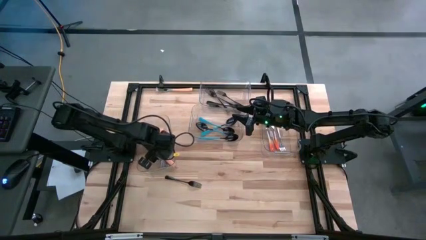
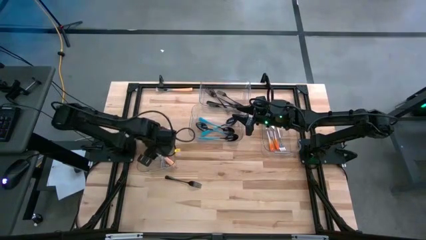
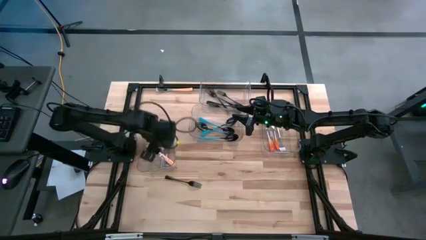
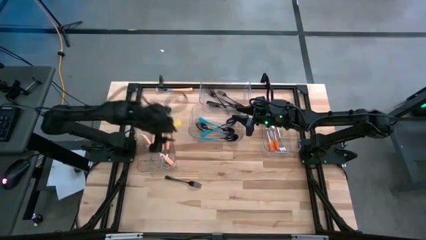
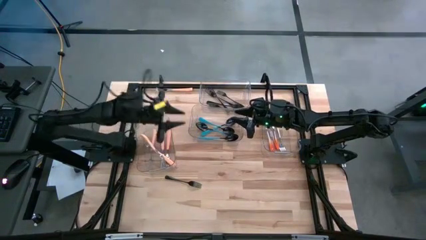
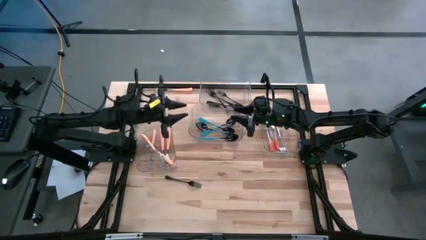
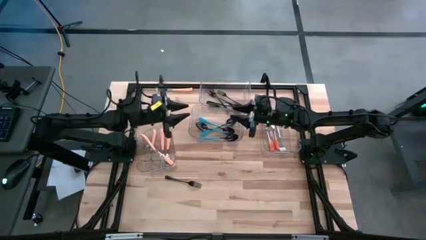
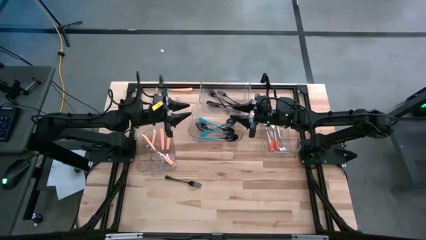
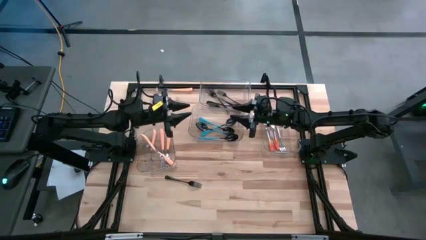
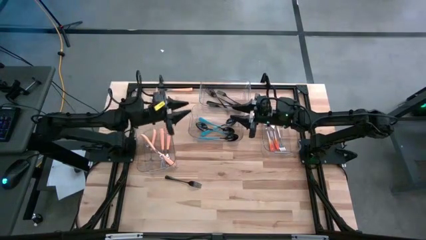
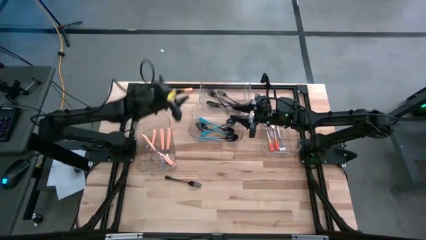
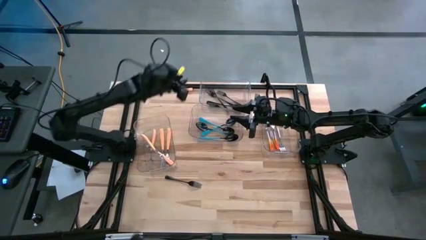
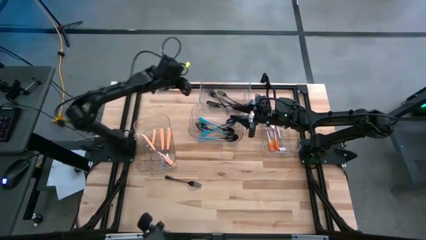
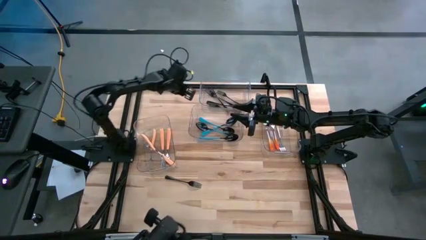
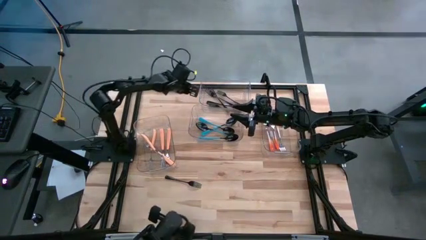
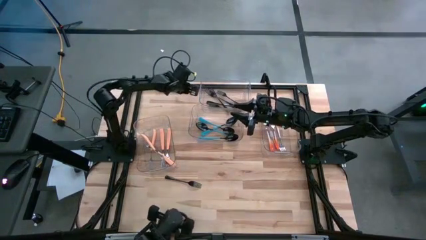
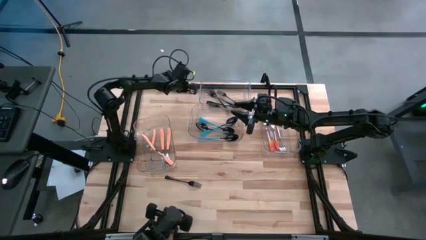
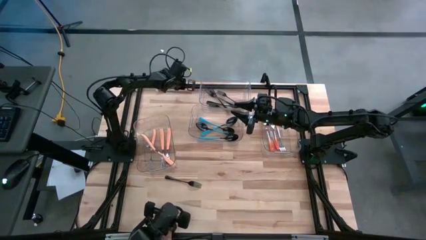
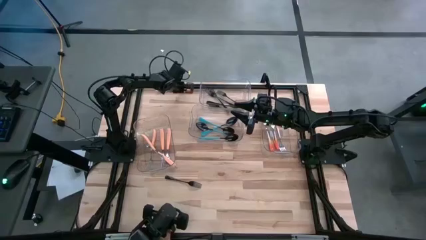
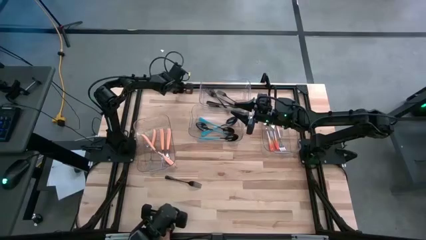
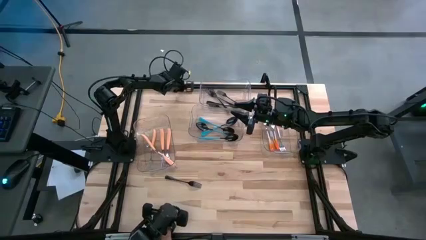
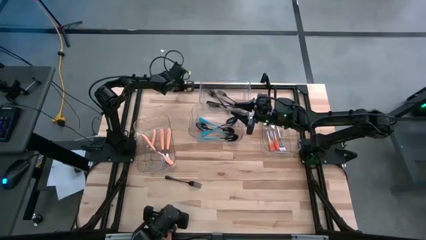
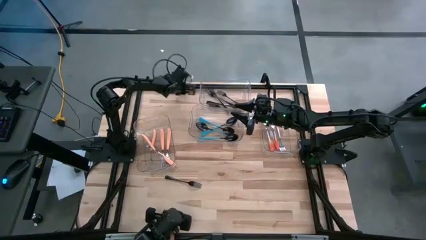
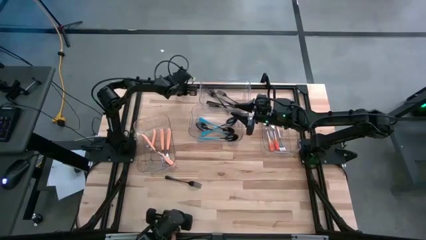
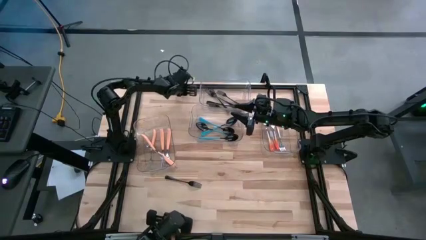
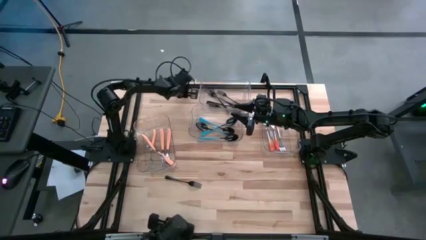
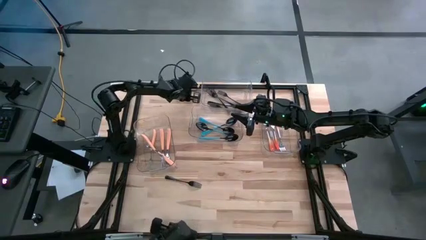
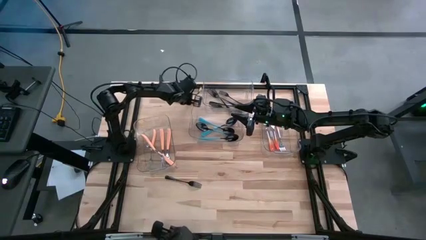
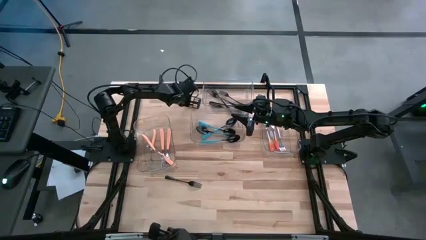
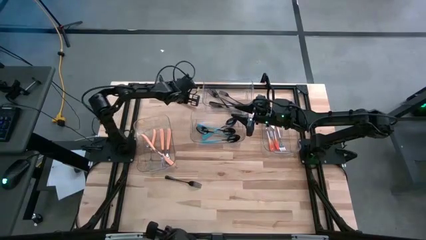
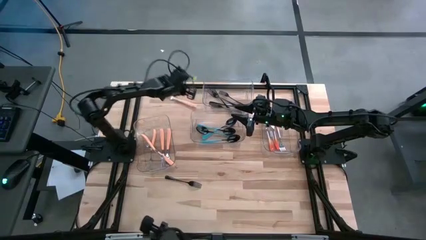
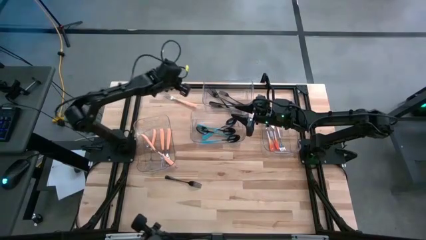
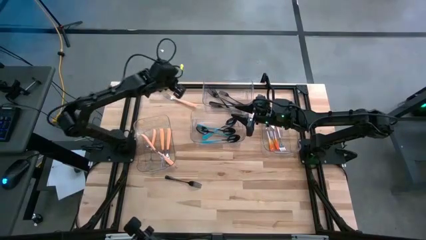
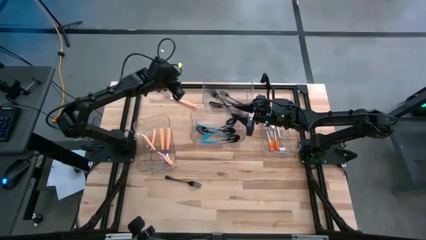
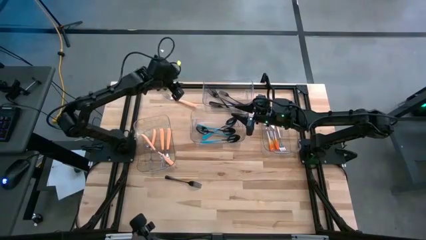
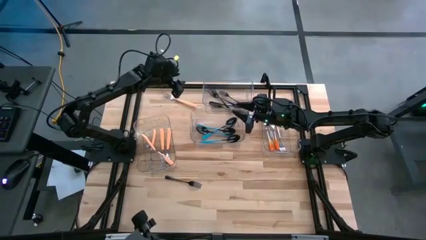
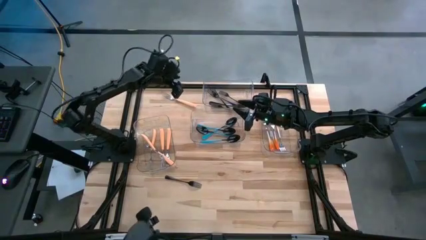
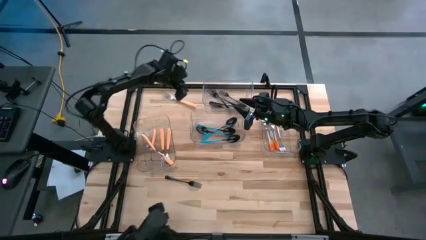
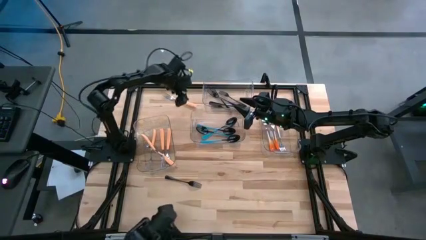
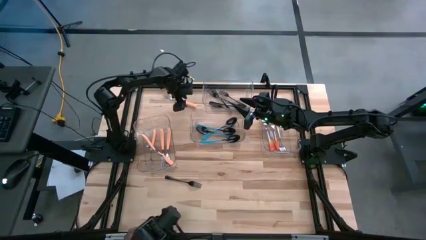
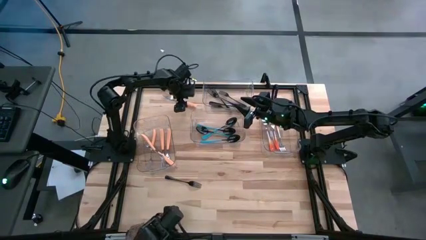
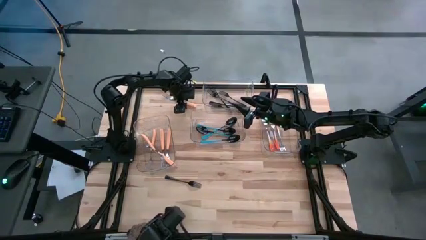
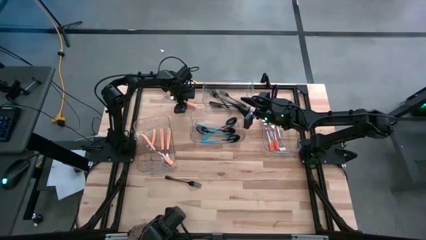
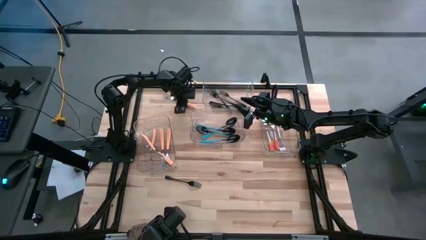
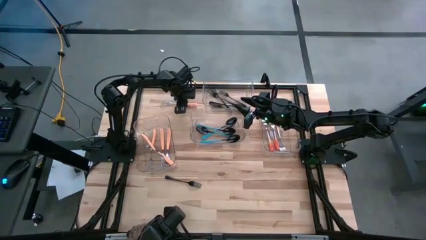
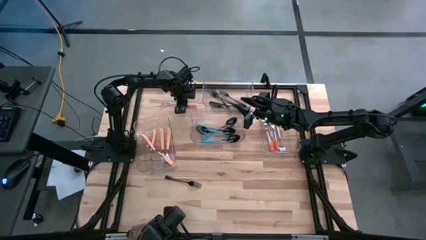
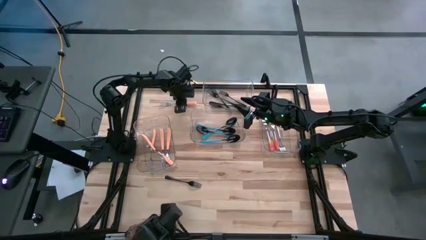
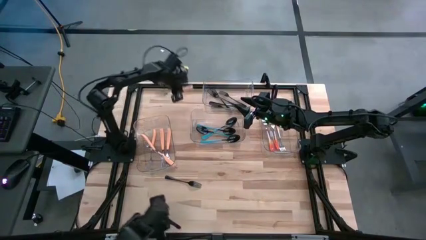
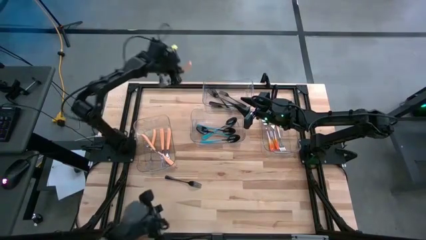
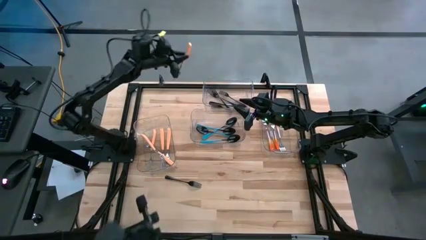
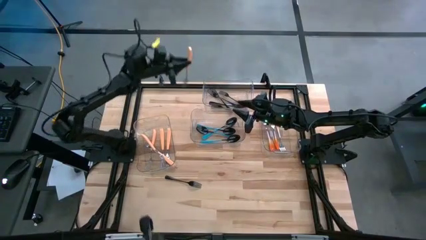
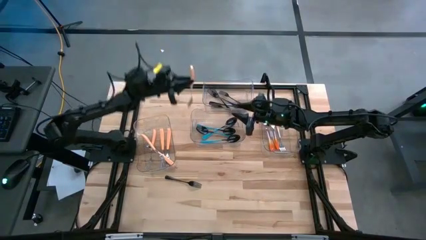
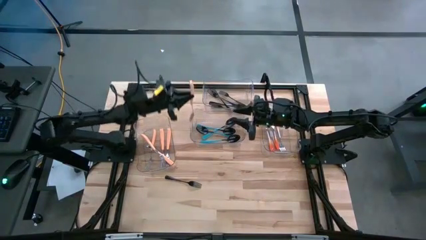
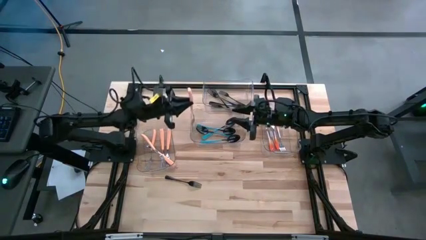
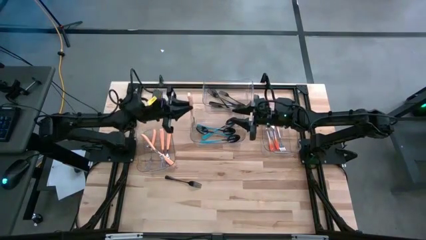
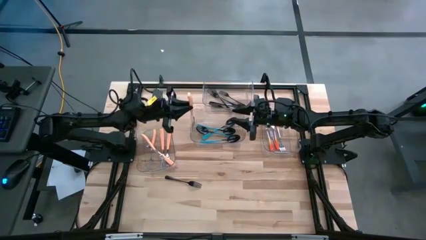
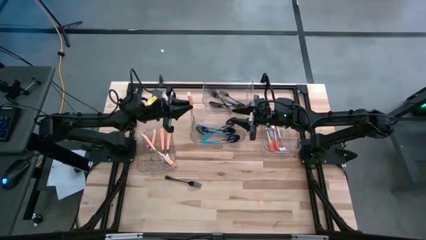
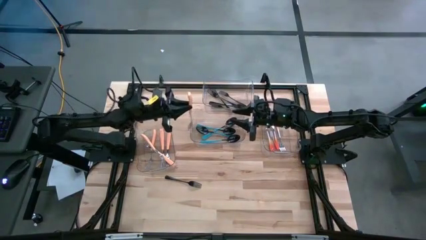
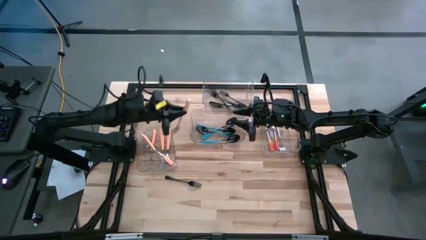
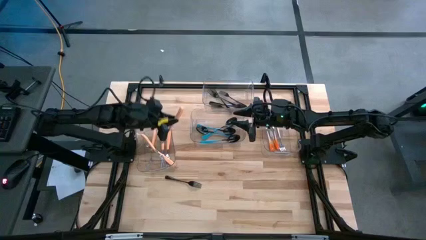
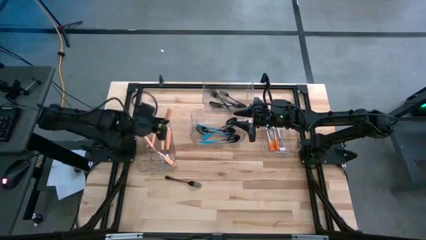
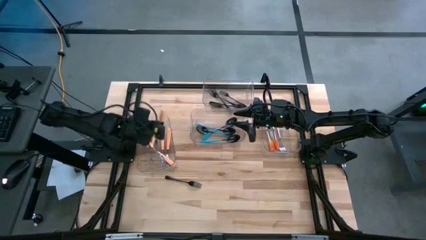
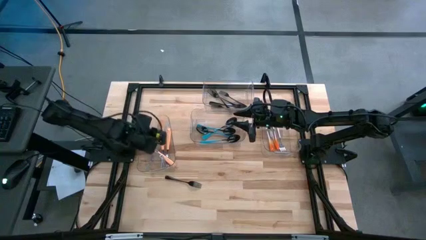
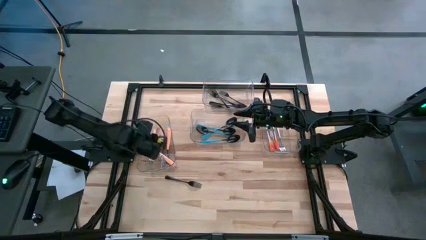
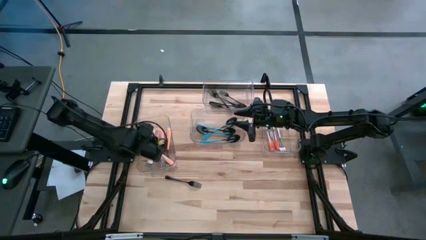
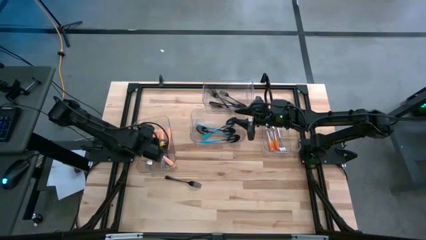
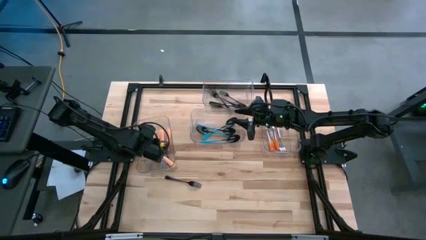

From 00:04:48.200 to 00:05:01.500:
Task: Sort silverware by color (type)
Put the light orange fork into the bottom left transparent bin
